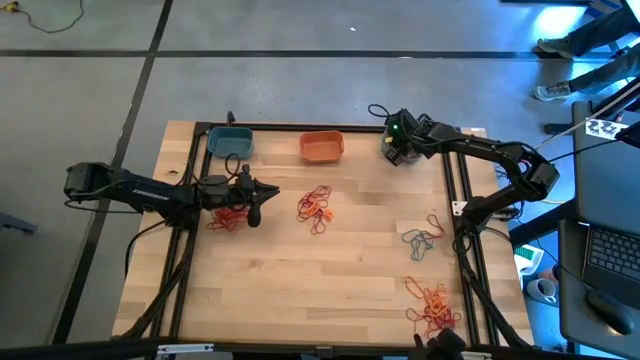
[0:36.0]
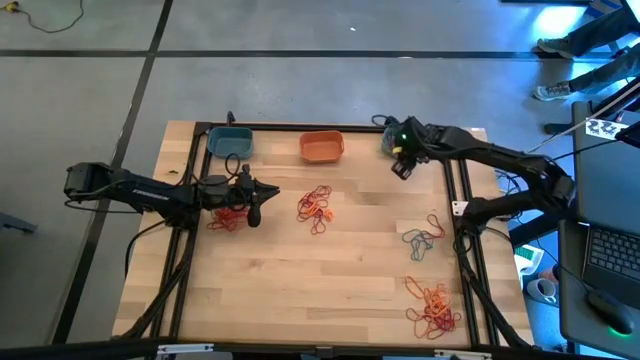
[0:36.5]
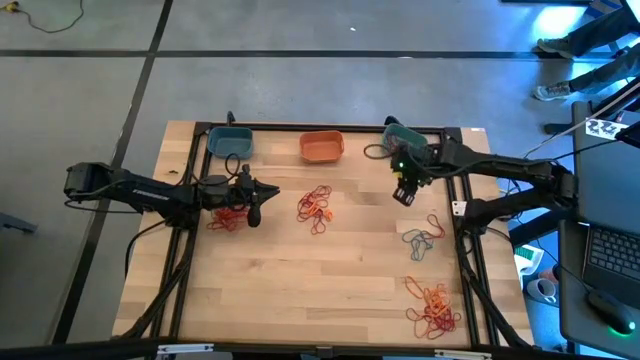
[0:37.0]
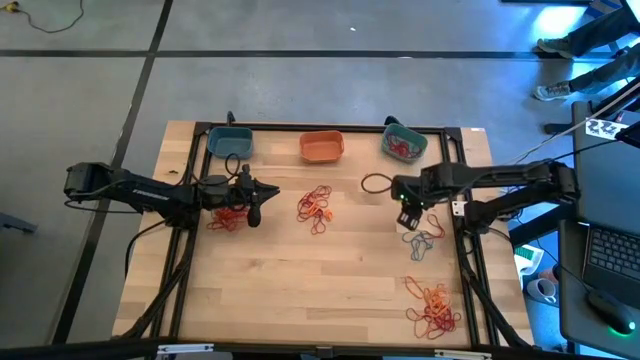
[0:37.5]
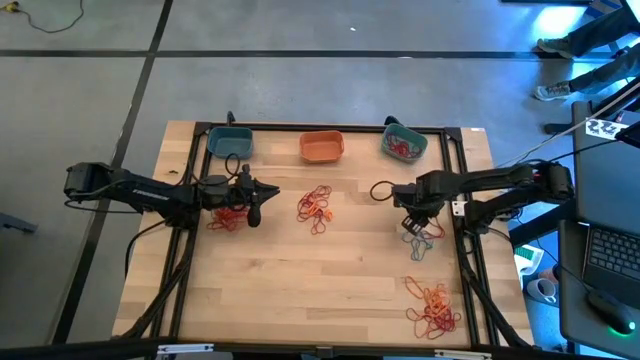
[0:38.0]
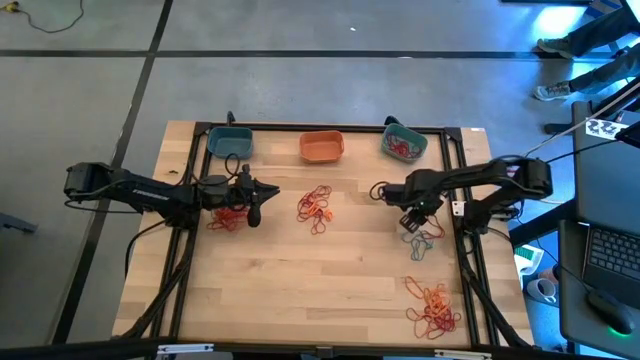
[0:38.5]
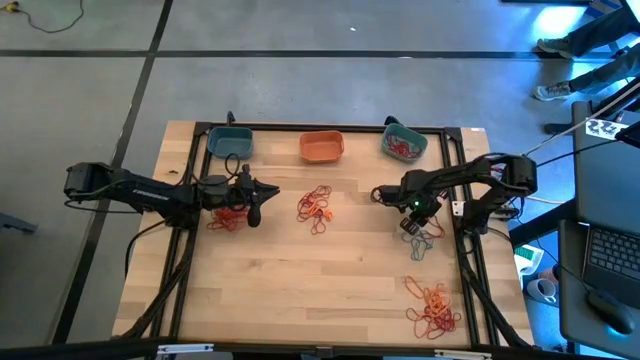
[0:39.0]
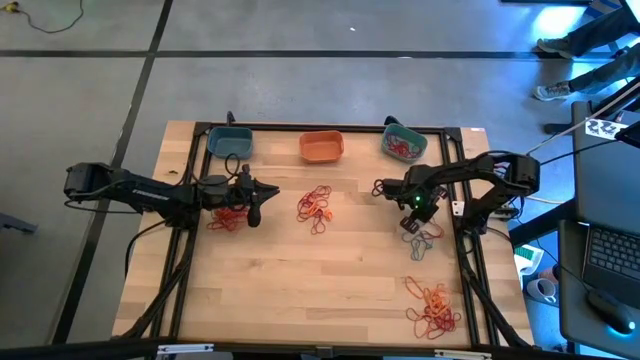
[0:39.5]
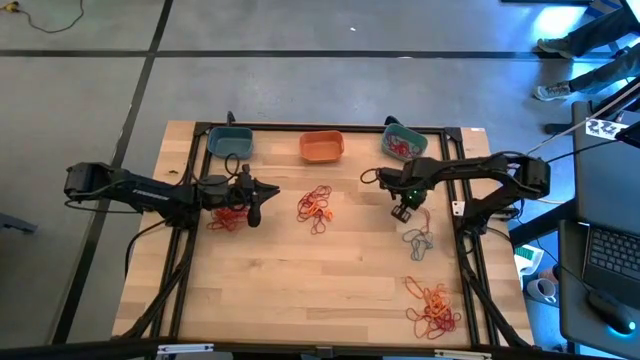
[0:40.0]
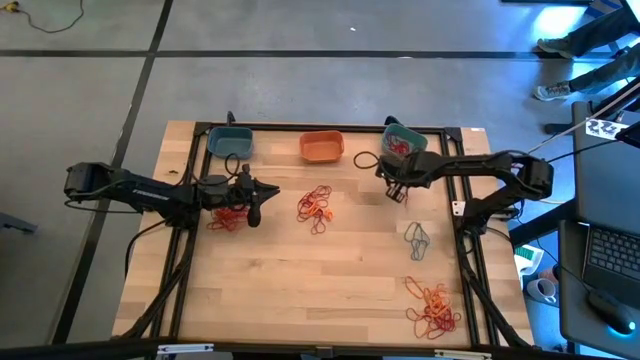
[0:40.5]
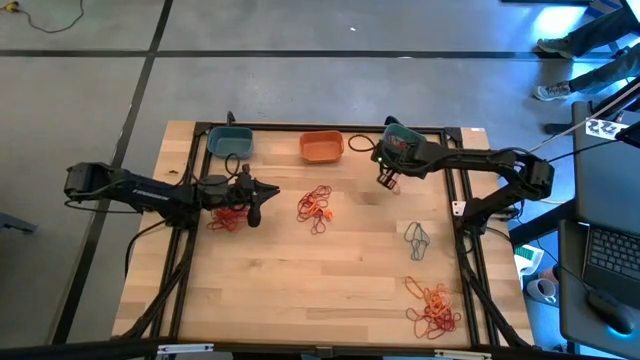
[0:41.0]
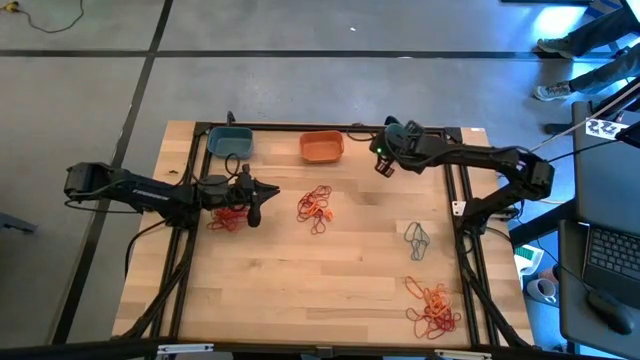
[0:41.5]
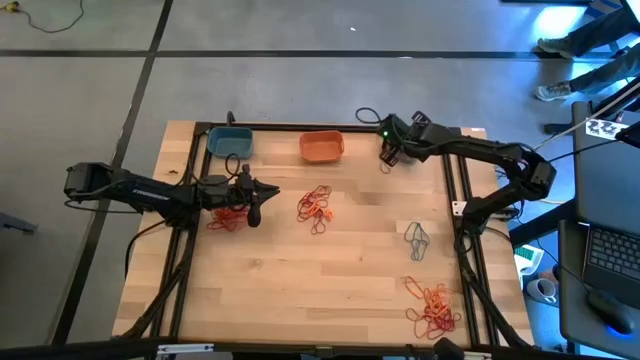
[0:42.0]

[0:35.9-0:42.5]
Task: Sort rubber bands into baskets
Put the red rubber band into the green bin

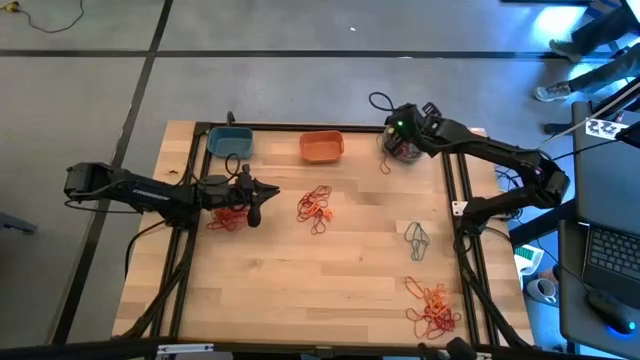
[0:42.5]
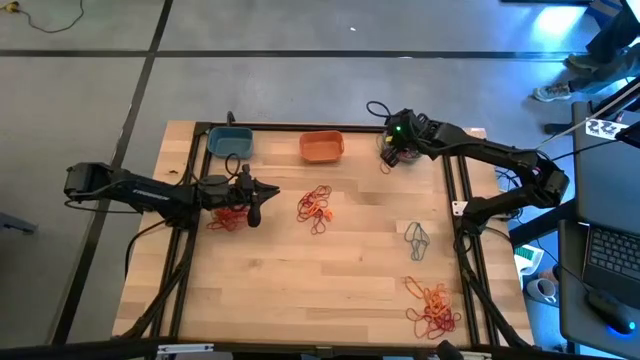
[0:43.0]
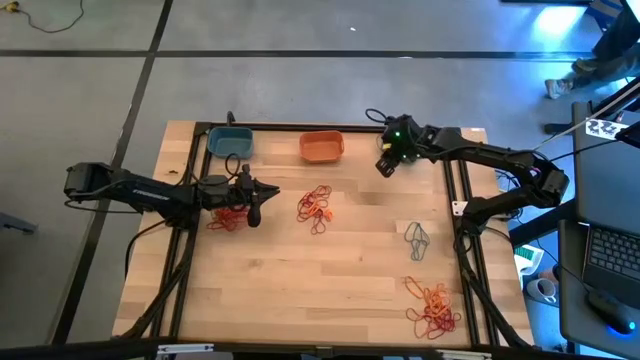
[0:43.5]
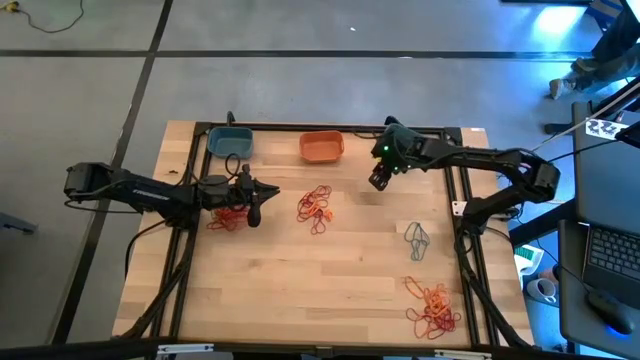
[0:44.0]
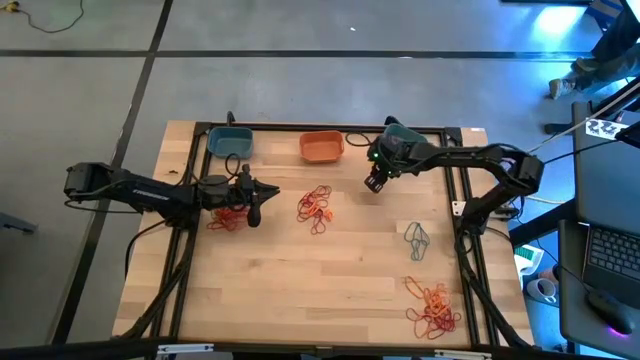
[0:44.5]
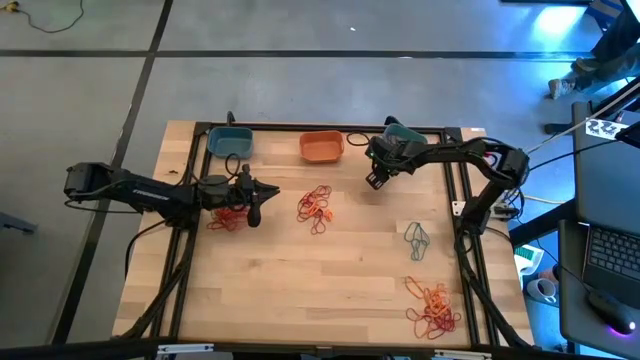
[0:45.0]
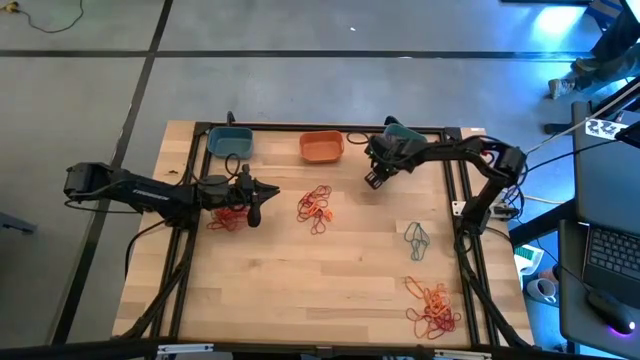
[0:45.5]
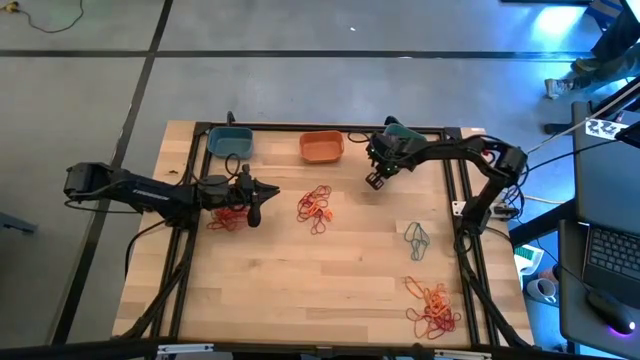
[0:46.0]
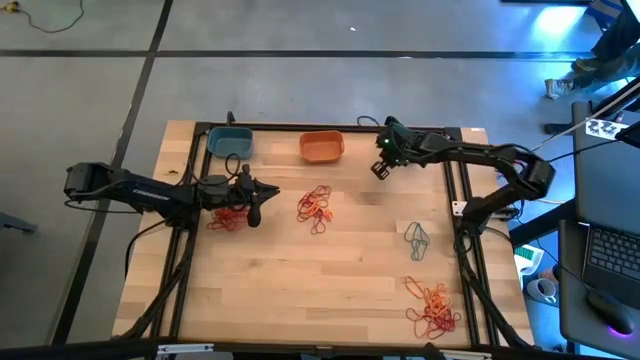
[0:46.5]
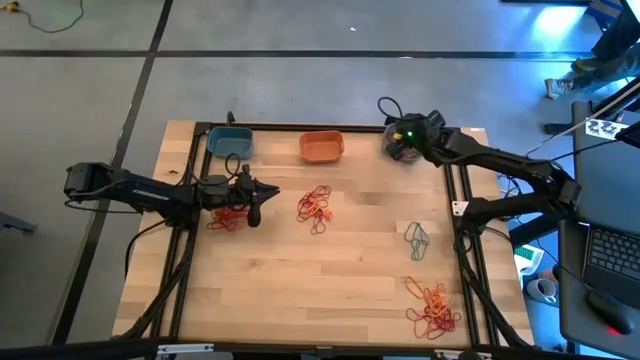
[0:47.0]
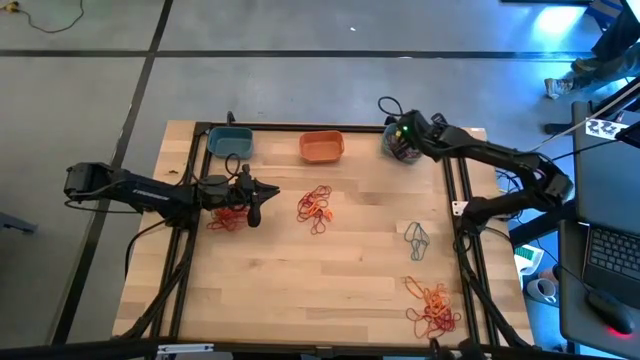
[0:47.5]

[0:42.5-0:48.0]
Put the red rubber band into the green bin

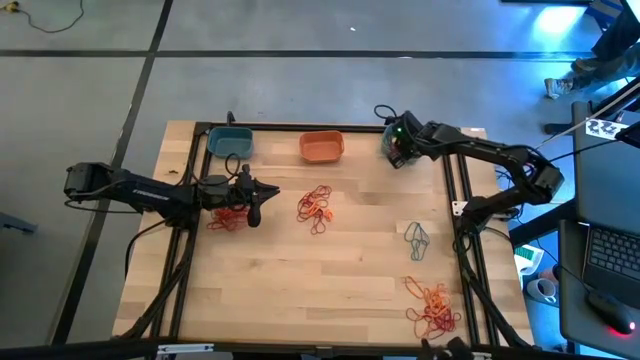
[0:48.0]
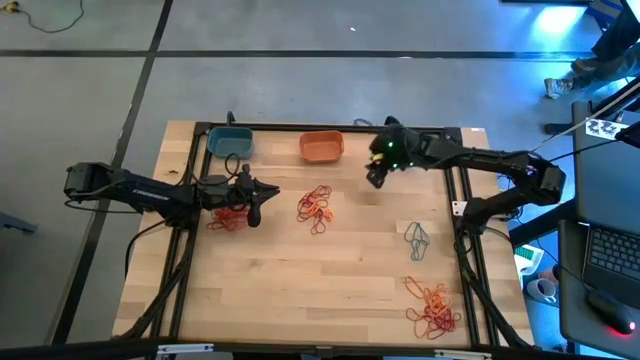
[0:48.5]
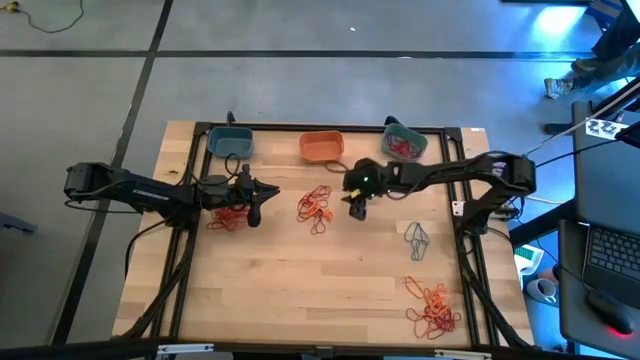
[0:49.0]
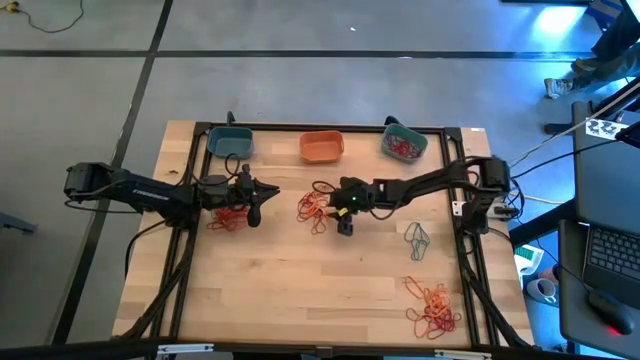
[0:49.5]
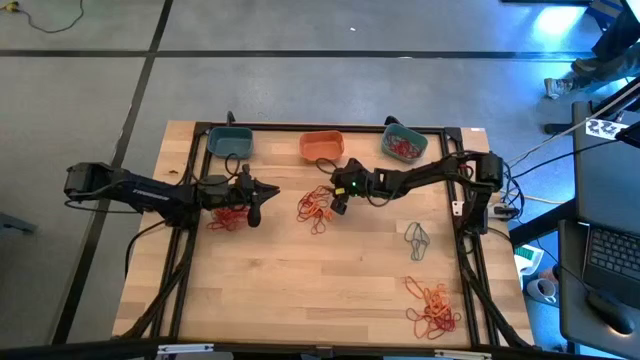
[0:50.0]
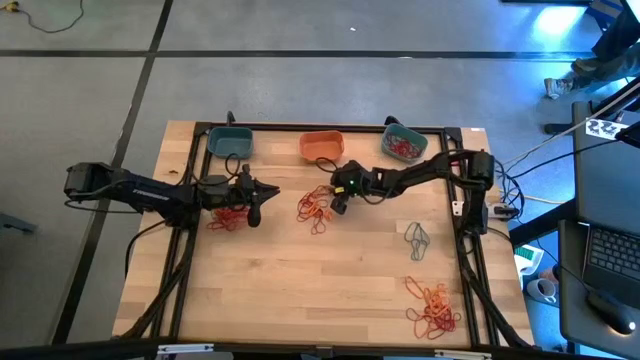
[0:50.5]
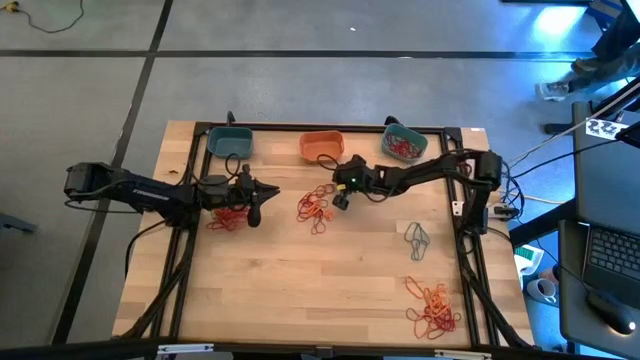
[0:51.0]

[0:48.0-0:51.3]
Put the red rubber band into the green bin

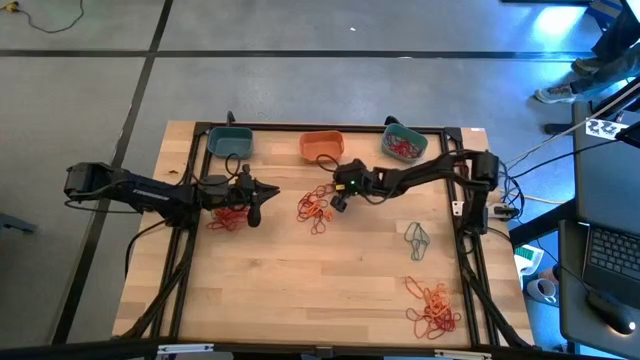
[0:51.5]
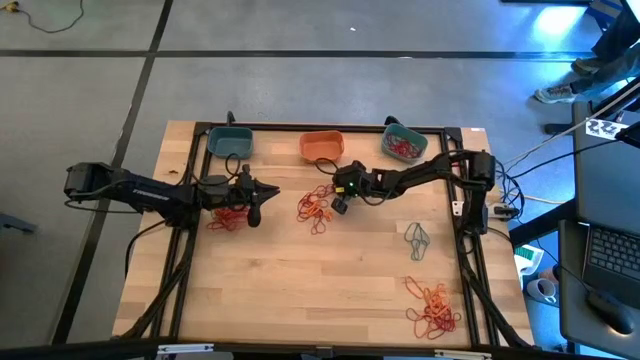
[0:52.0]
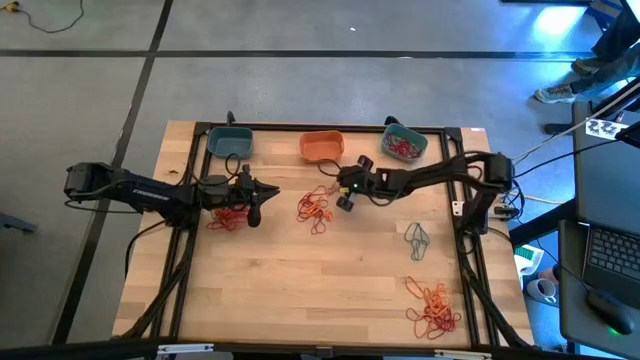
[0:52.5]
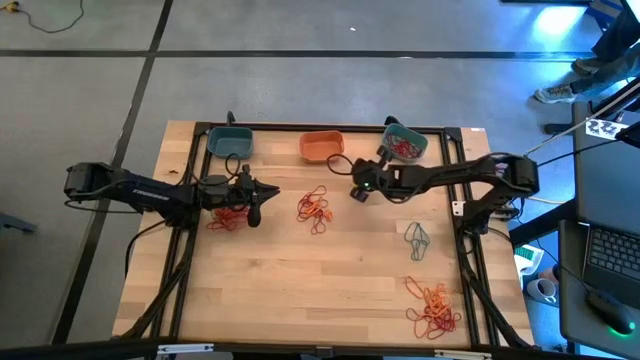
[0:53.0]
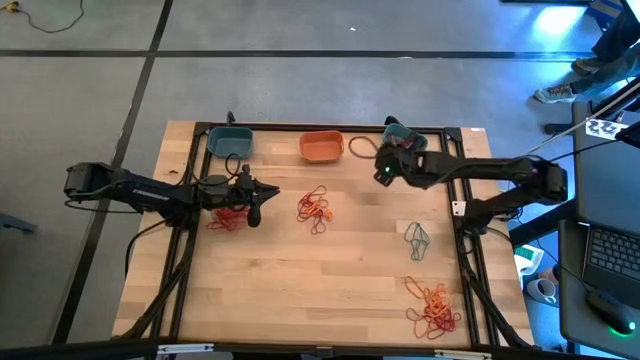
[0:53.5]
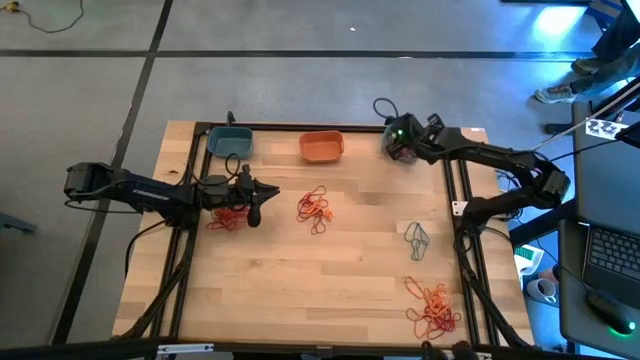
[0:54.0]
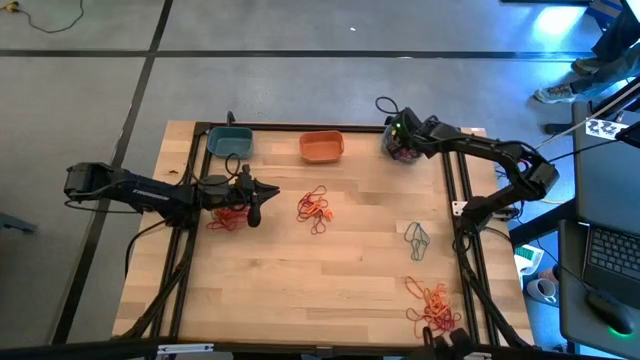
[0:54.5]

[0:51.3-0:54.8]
Put the red rubber band into the green bin

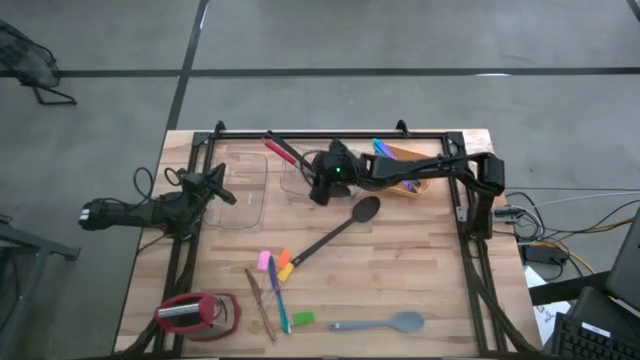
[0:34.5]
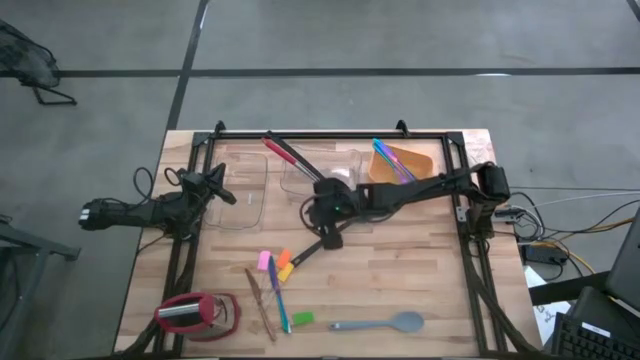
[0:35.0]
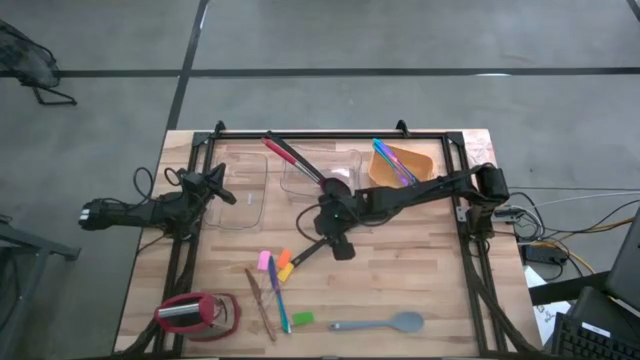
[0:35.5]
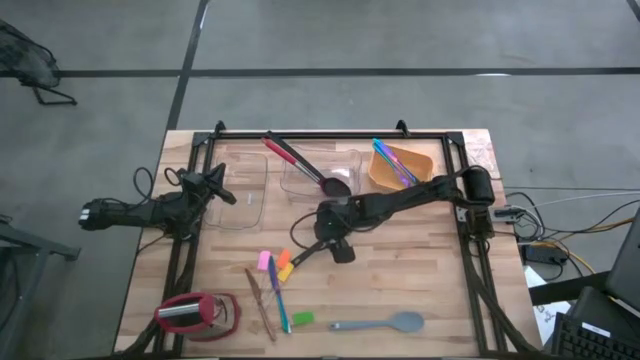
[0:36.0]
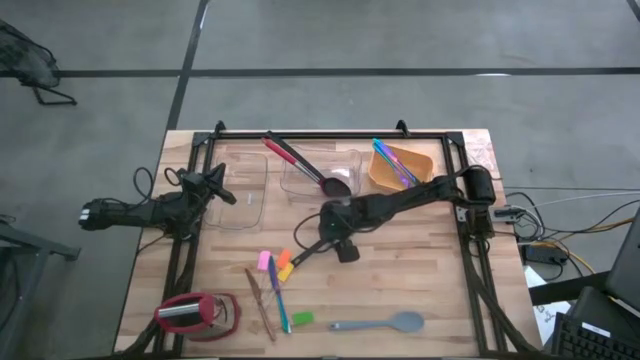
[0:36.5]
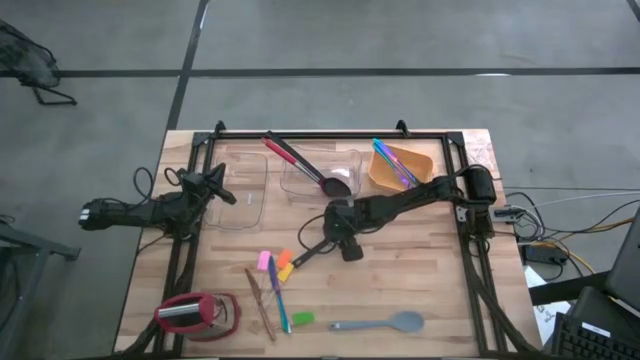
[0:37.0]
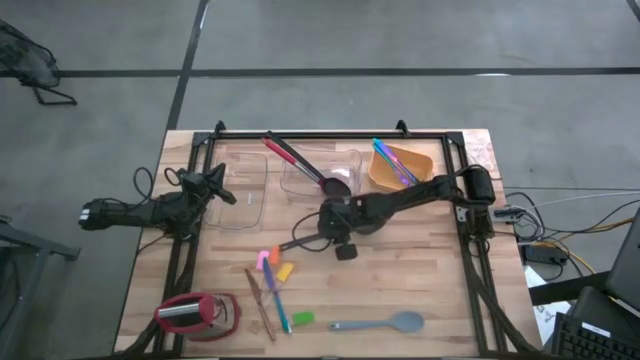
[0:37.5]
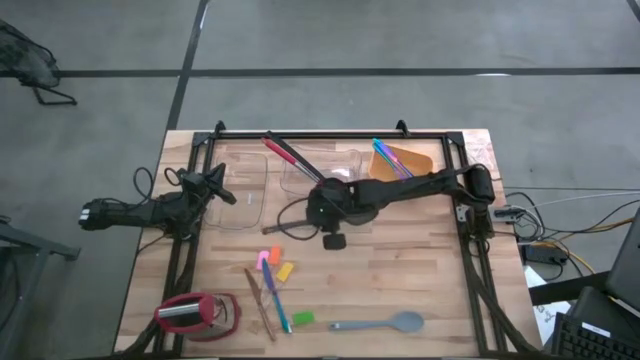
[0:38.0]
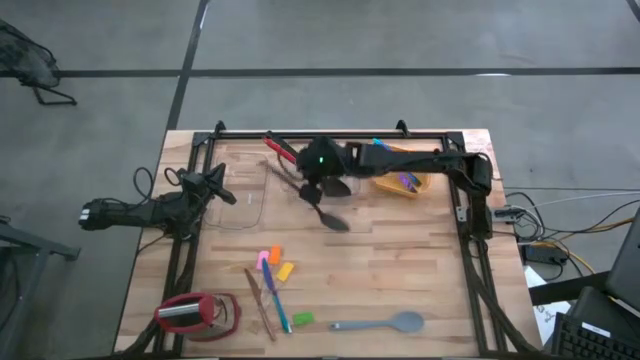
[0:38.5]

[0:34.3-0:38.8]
Task: Sort silverware by color (type)
Put the black serving spoon into the right transparent bin
